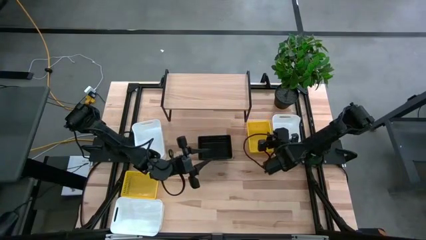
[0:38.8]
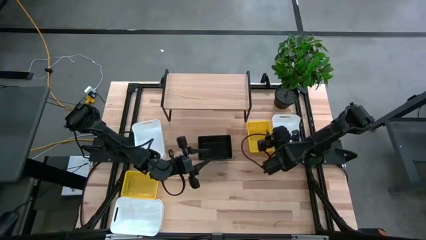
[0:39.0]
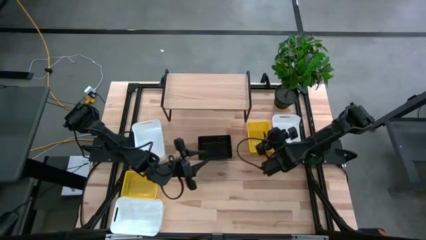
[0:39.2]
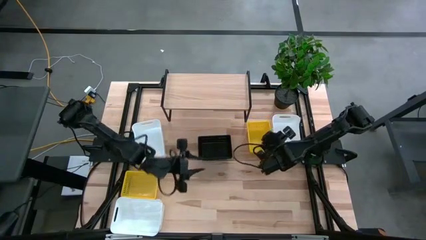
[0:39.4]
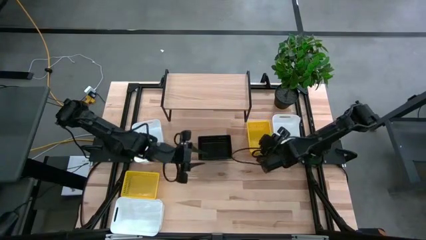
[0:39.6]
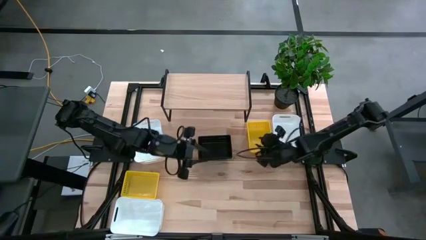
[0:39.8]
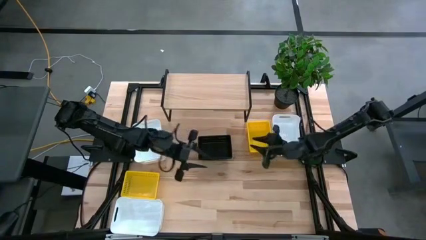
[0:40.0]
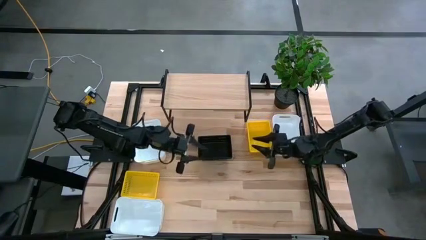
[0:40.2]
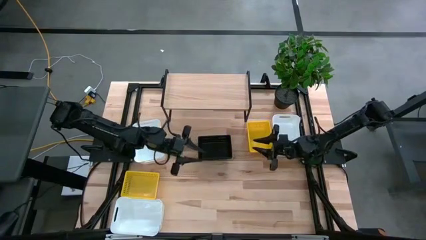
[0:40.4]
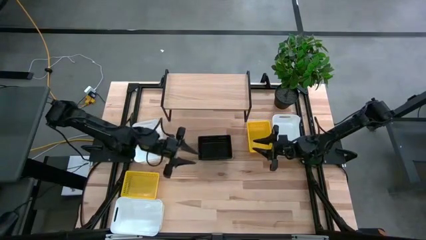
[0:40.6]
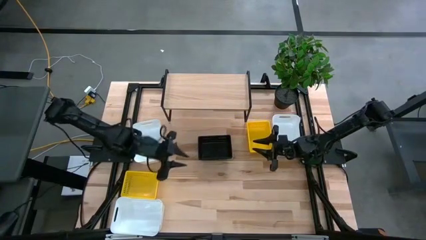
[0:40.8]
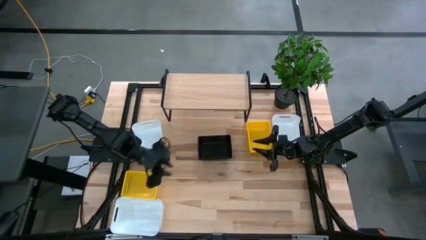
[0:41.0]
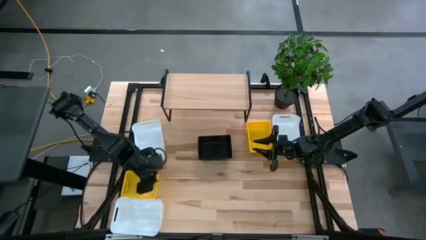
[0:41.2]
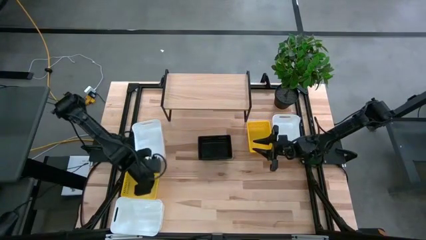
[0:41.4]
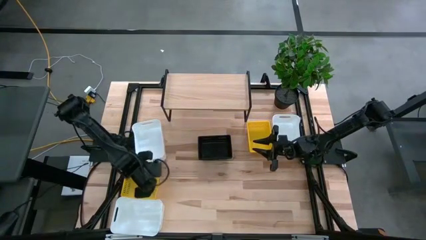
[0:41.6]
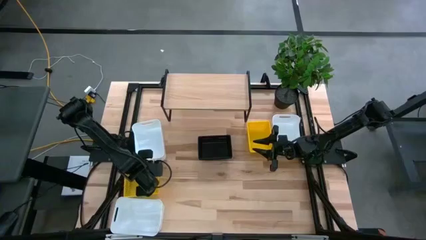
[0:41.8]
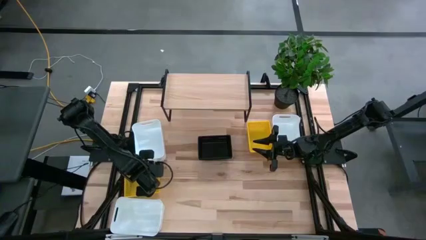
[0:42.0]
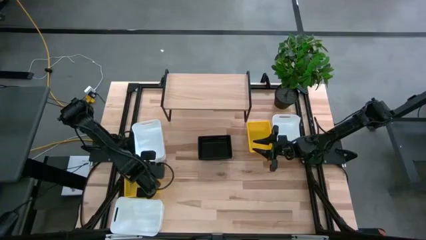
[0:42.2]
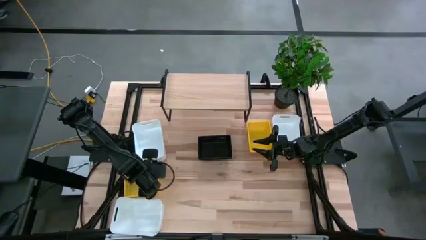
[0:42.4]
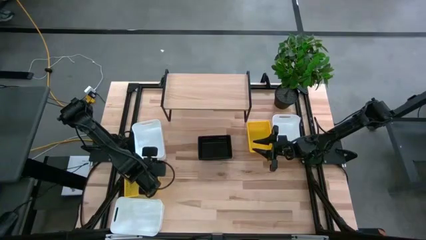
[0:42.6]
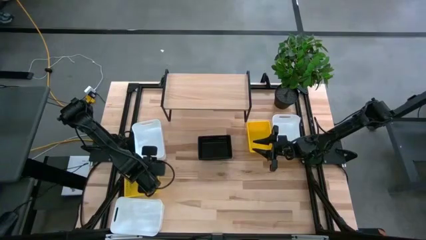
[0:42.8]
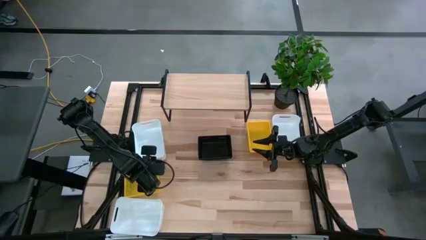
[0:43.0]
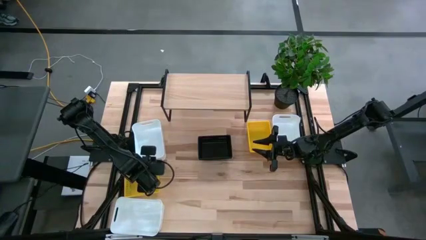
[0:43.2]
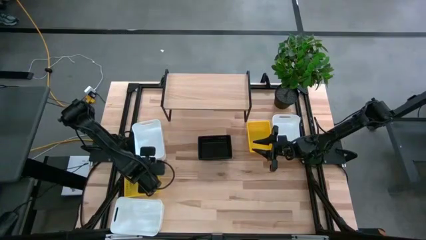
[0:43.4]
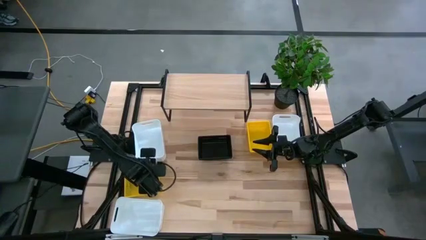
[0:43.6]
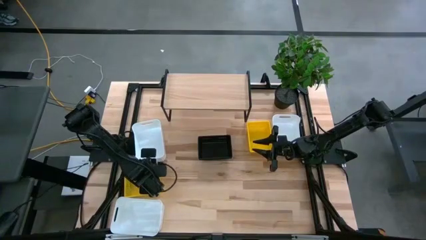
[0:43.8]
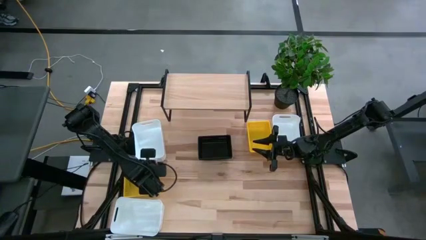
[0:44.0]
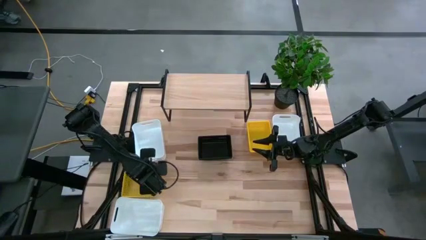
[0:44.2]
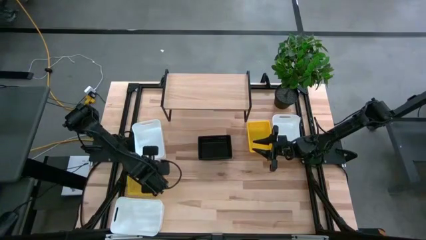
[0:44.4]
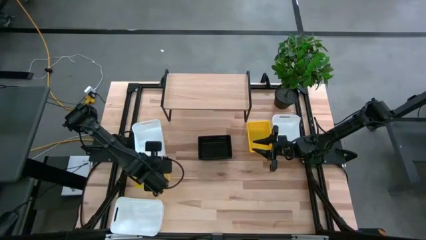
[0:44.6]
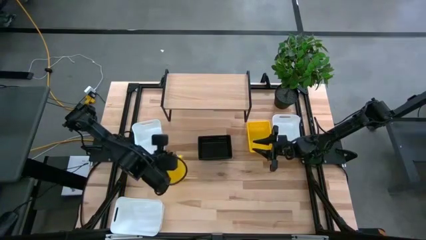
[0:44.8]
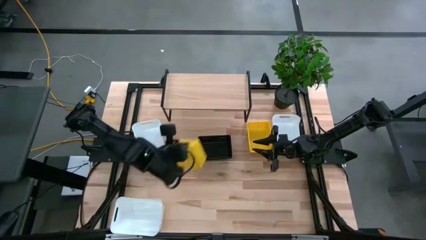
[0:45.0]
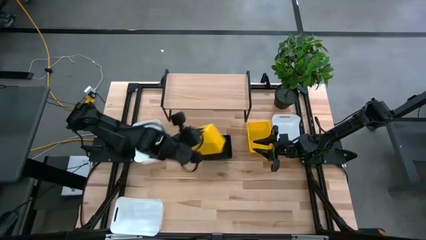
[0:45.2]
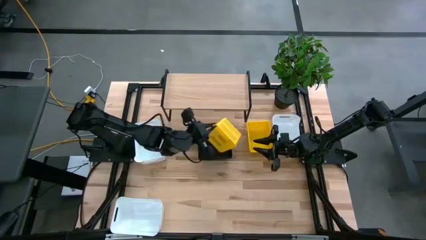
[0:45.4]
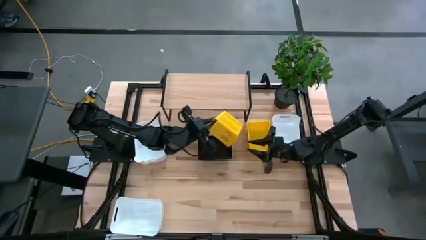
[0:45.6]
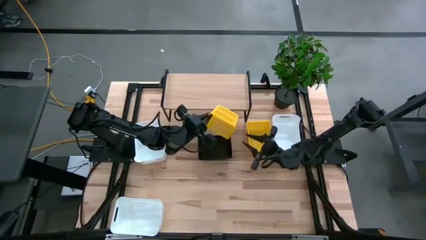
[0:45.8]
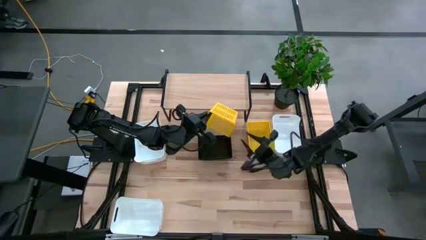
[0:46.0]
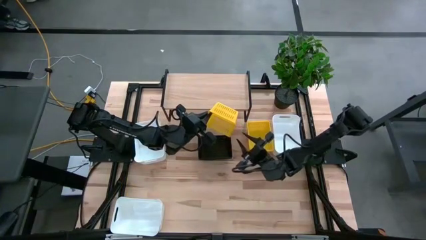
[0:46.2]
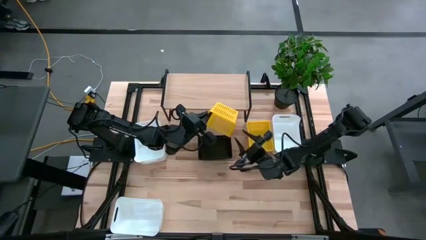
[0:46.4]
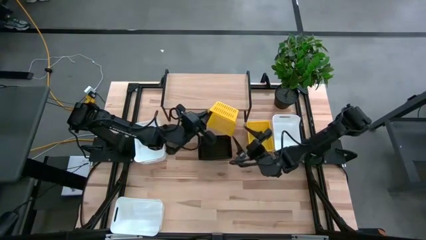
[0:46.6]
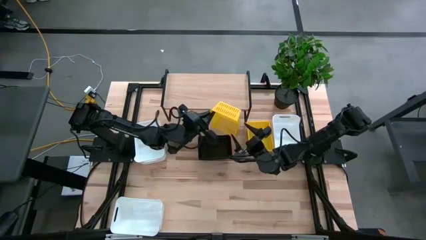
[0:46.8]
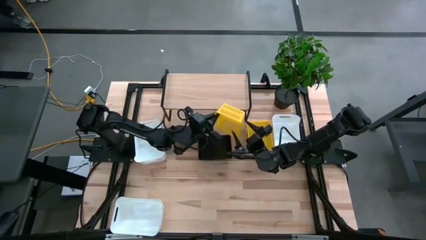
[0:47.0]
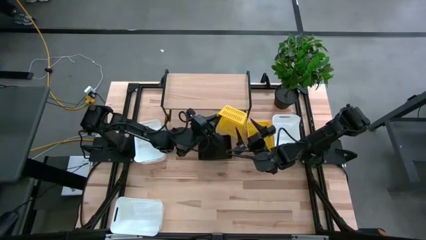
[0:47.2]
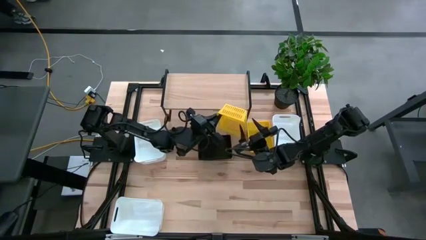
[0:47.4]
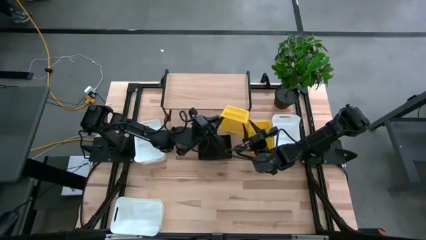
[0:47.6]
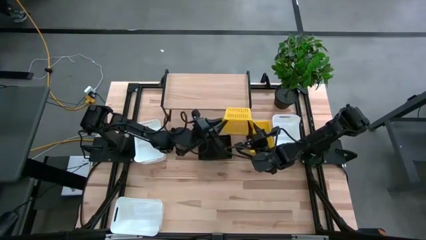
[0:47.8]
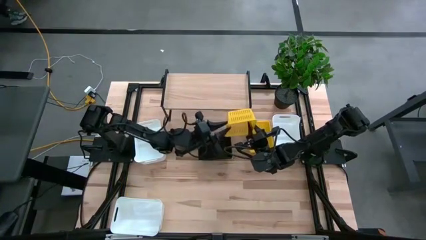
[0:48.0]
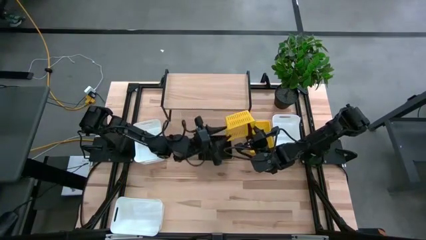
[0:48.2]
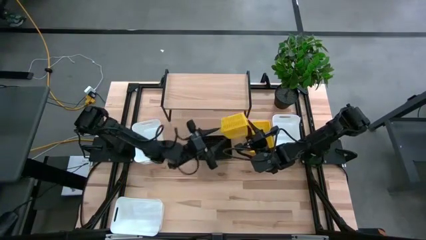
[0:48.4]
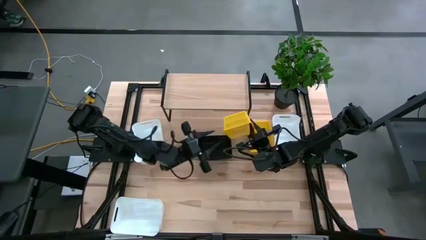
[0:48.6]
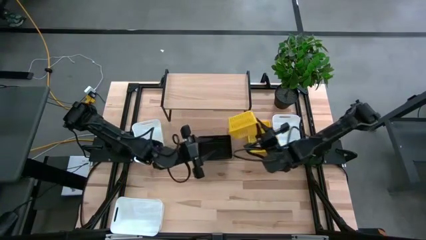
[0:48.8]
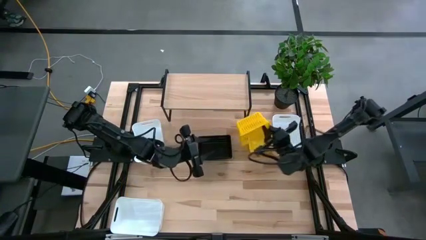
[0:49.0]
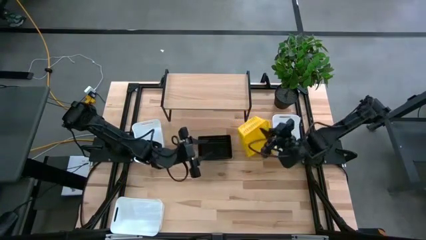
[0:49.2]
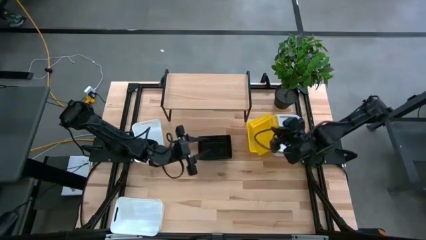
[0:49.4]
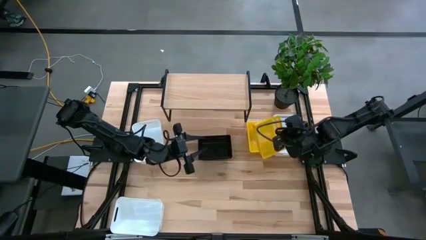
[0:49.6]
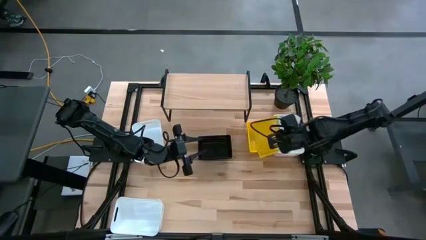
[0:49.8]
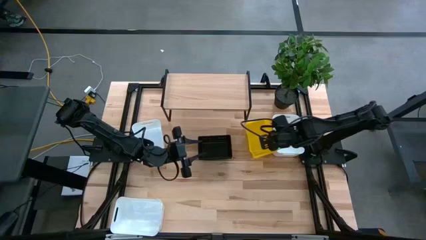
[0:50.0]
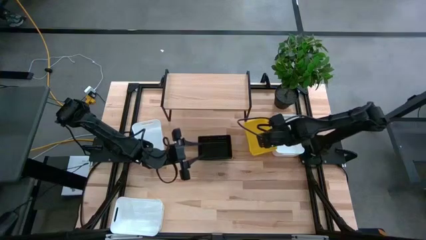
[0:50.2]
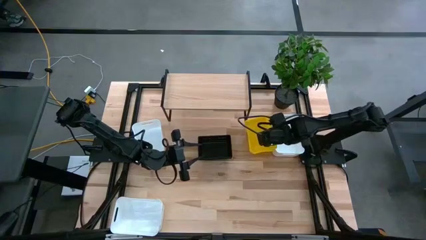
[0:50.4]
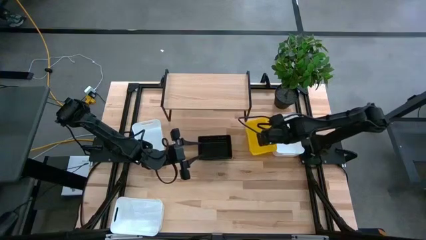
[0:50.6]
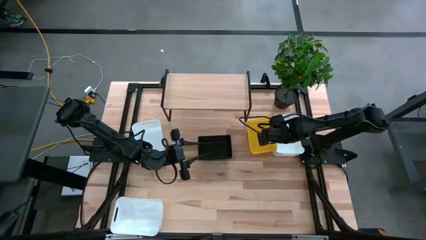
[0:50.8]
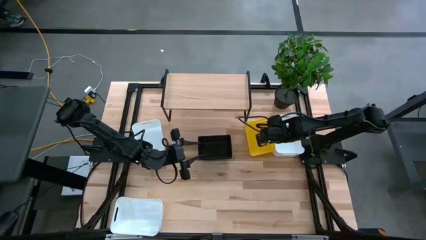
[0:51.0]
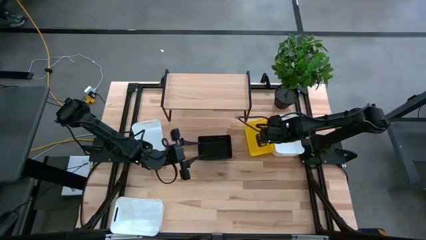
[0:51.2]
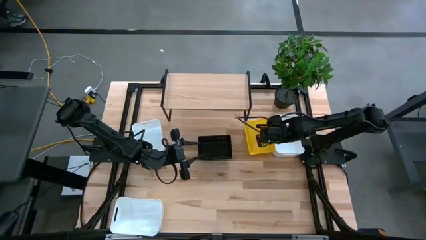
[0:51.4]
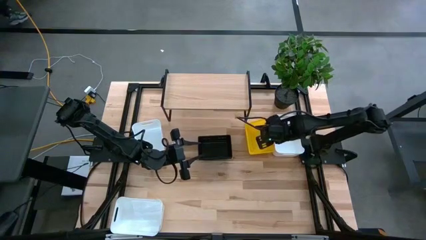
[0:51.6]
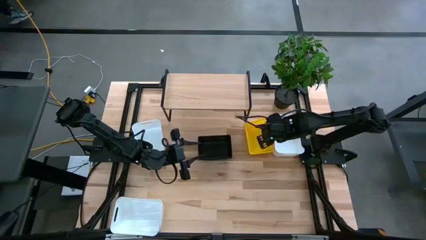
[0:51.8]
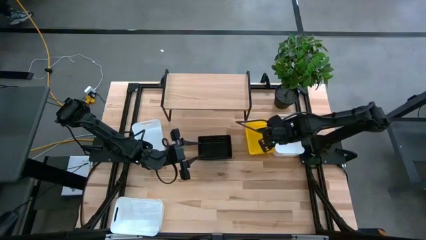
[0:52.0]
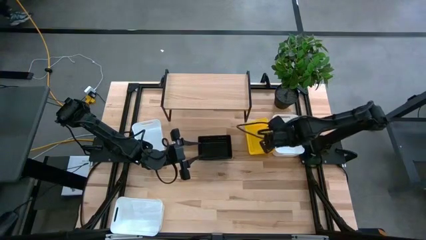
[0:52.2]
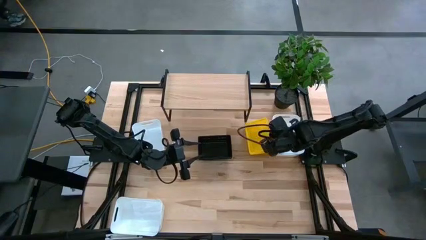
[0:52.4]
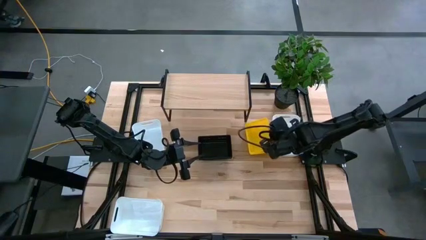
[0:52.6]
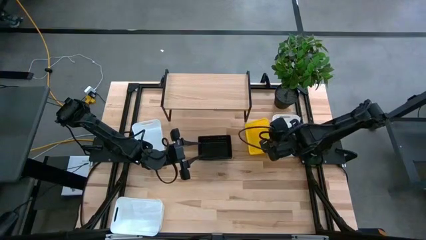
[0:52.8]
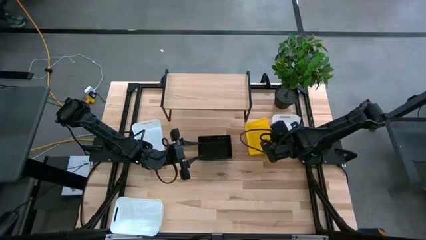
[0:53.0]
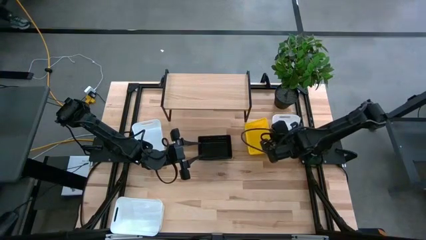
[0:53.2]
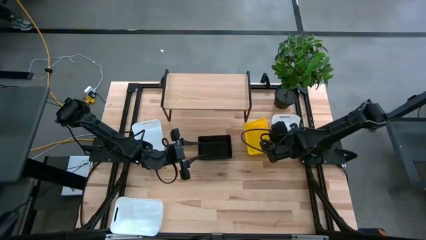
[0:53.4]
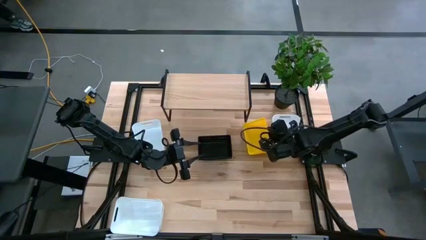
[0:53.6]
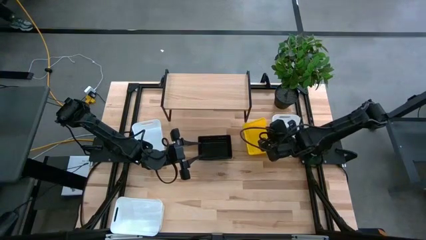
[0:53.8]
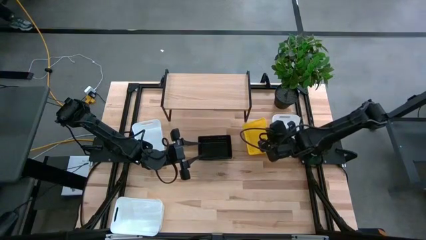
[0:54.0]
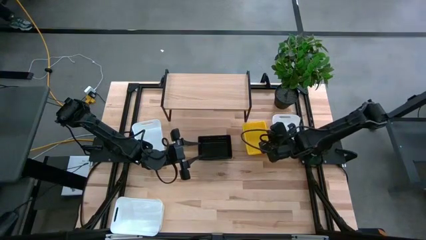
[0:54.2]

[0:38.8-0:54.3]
Task: Stack baskets on shelf by color
Stack the bottom yellow bin on the top yellow bins
